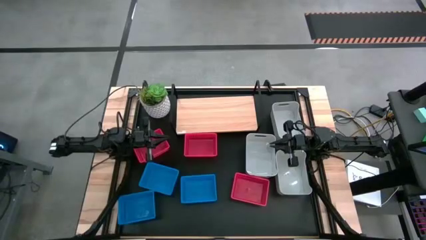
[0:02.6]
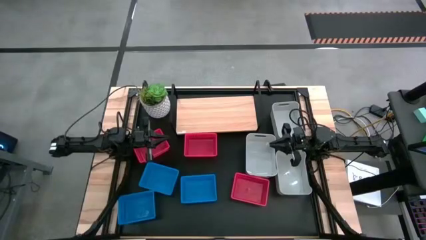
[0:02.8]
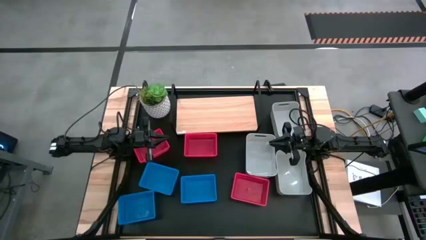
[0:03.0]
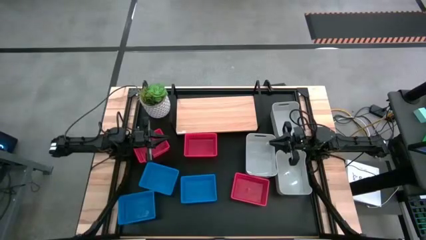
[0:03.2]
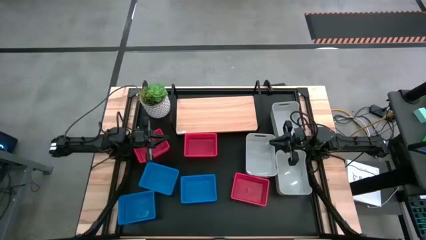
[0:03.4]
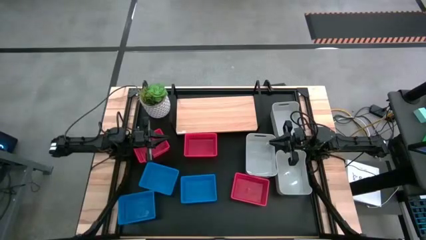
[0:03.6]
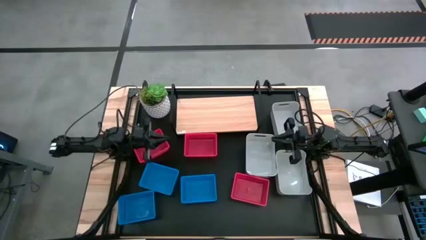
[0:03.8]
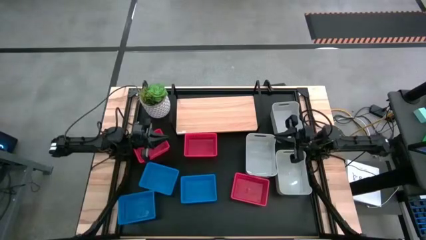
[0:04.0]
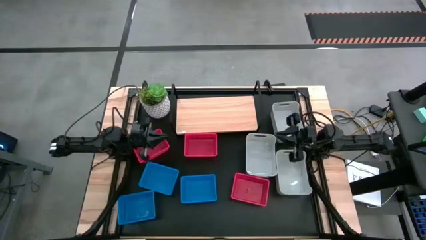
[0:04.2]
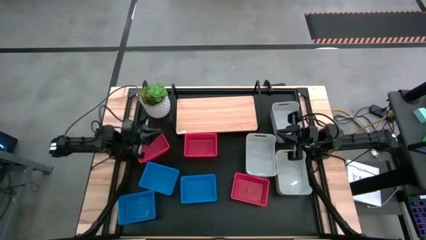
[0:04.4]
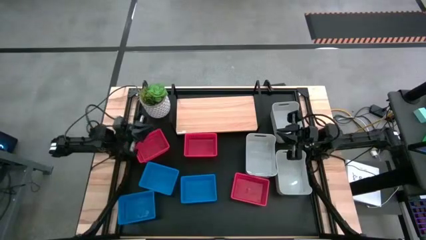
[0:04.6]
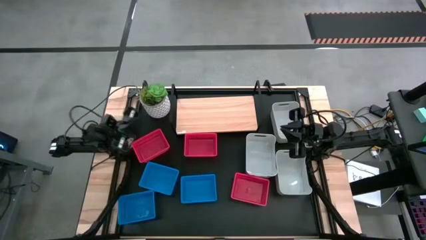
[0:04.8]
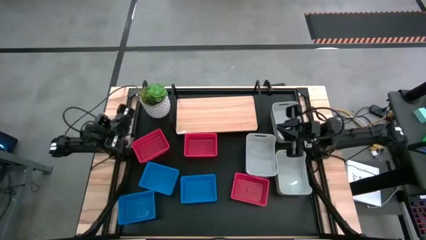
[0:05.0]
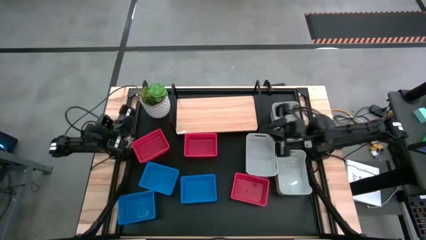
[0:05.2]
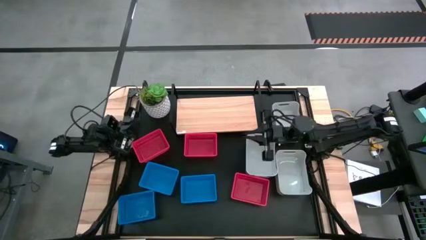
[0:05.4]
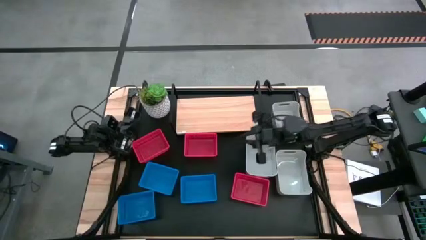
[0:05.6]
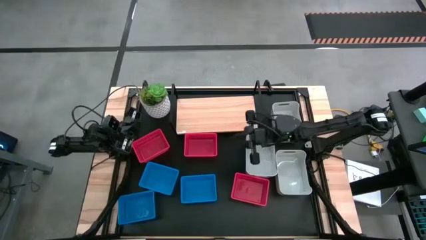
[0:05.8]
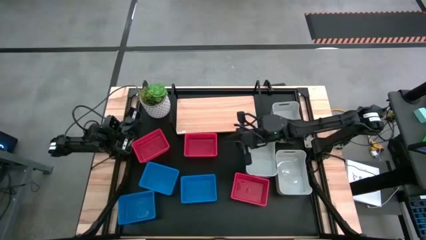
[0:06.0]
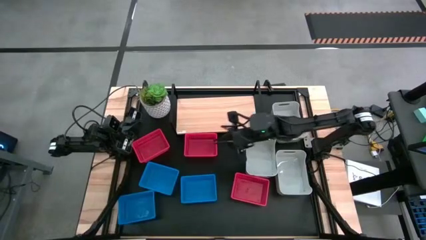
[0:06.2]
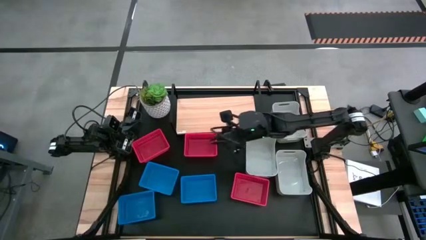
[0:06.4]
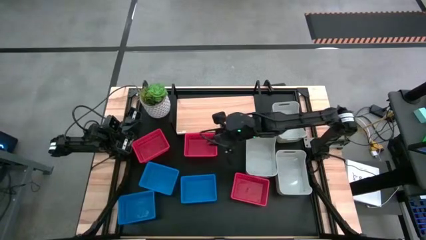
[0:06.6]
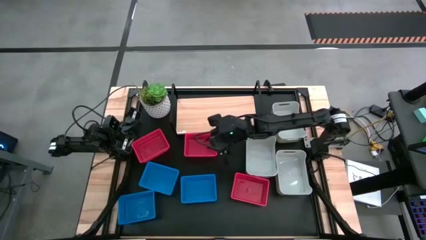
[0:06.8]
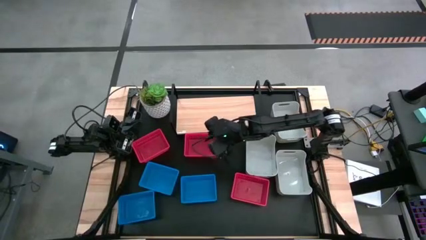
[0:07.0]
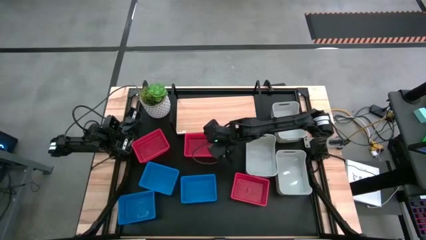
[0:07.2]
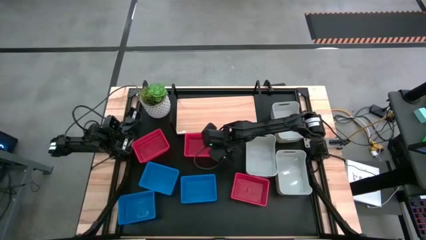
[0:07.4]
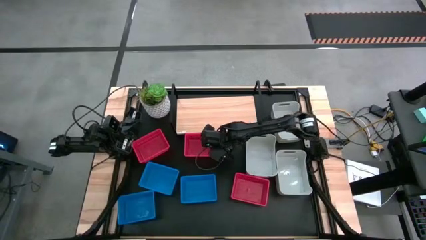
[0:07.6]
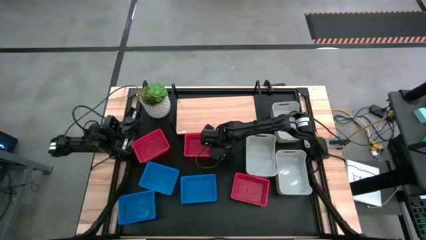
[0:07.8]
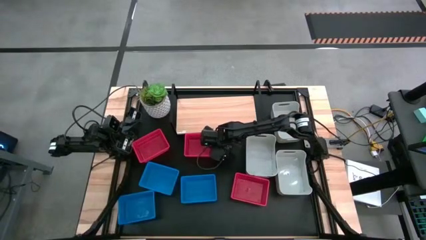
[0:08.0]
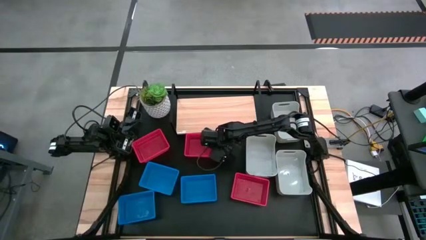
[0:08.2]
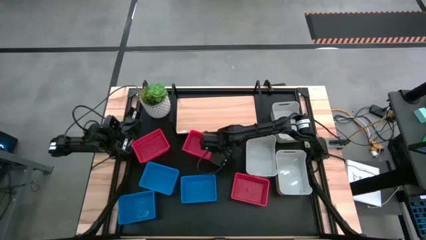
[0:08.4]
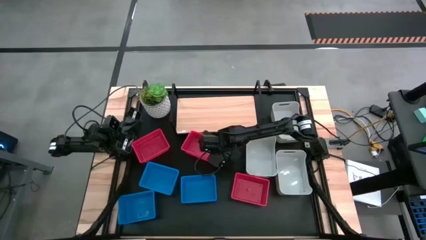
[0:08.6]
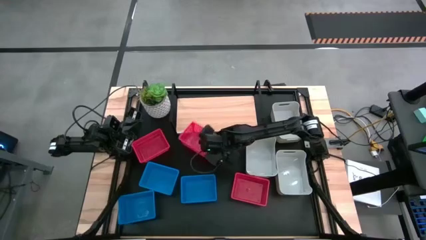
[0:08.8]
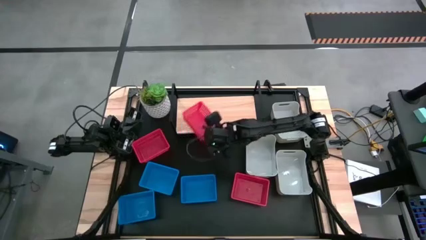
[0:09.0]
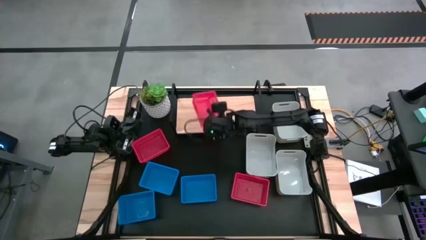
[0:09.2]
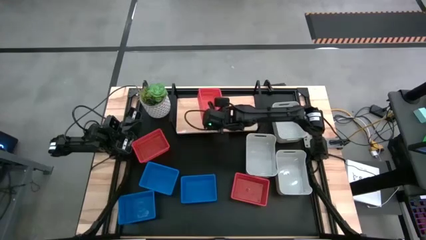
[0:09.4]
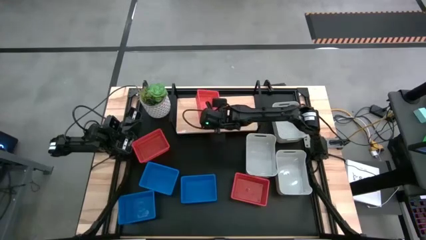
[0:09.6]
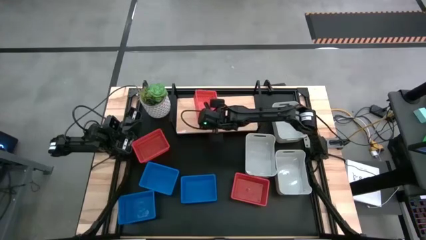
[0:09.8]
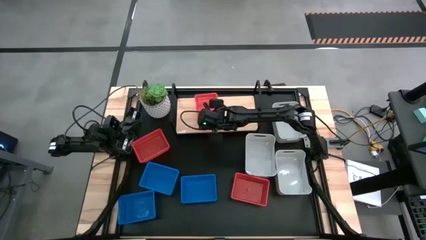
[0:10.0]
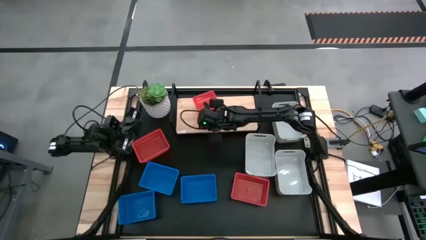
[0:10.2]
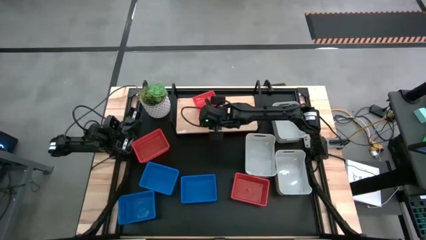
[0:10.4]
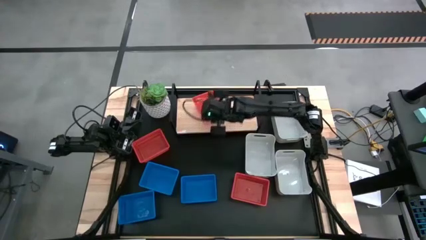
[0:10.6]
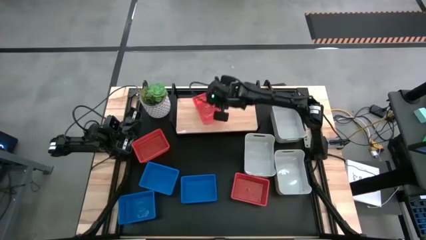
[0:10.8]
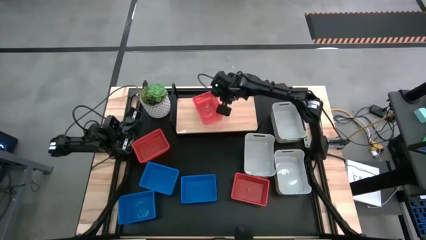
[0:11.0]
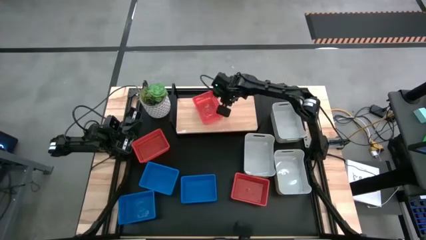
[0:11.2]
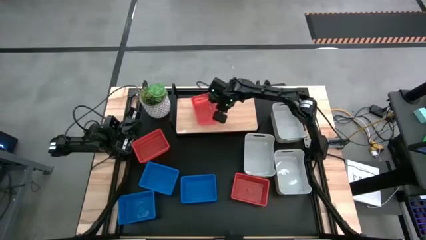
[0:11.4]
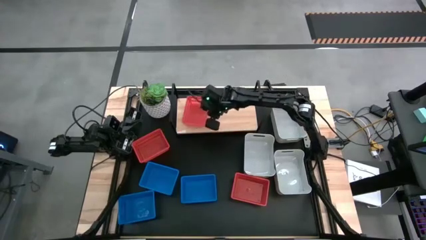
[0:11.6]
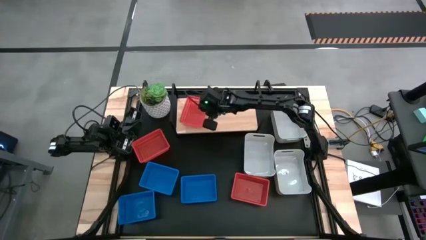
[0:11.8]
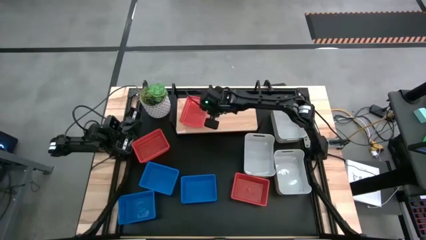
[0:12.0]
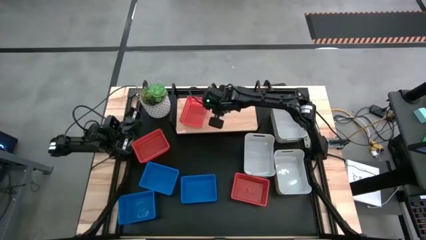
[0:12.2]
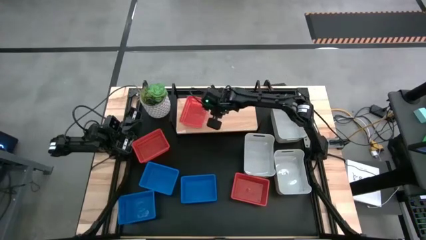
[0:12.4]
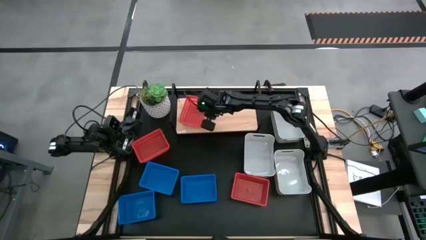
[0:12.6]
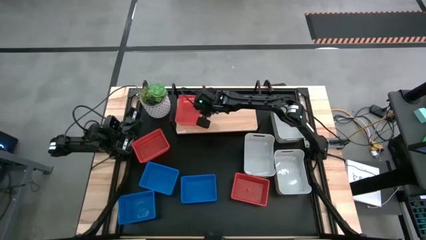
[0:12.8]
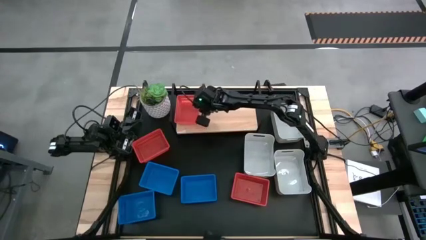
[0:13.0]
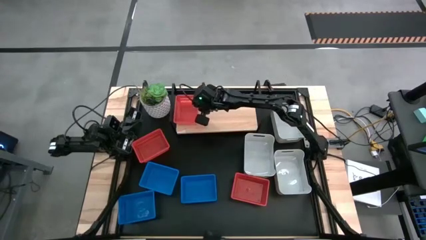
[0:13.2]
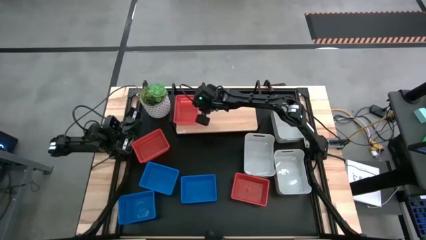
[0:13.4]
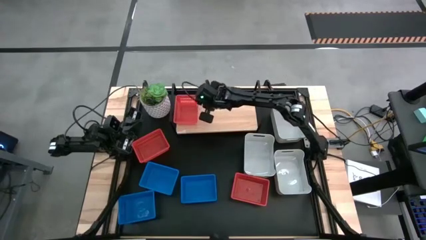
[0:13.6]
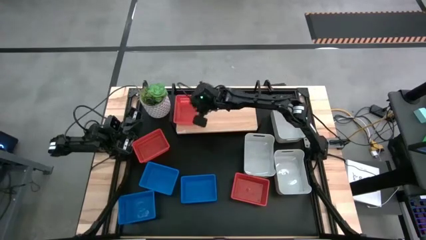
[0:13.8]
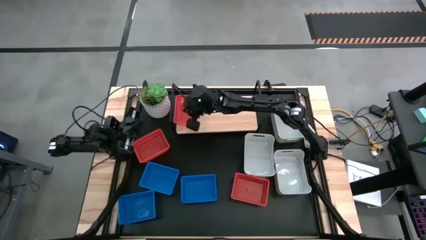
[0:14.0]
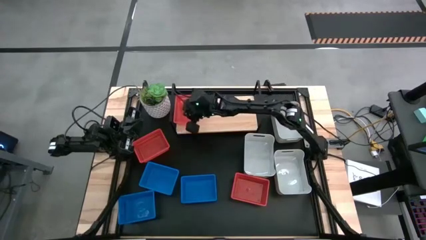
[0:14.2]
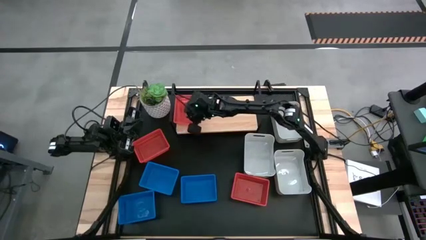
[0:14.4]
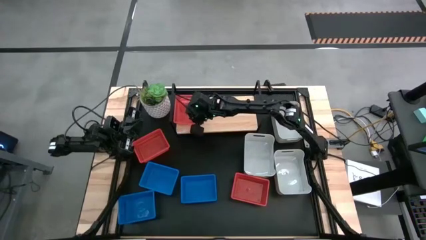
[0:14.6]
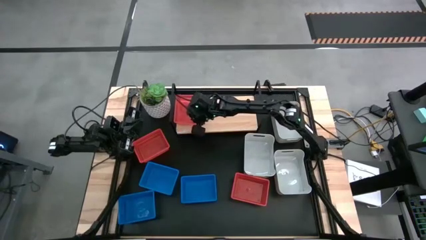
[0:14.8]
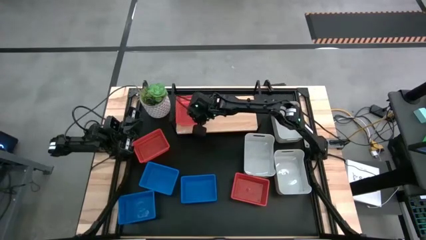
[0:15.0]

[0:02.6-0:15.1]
Put the top right red basket on the shelf
